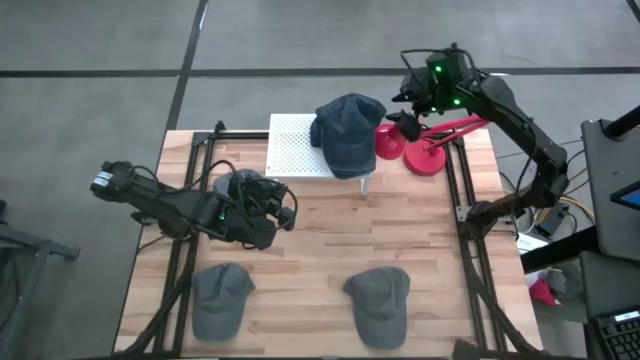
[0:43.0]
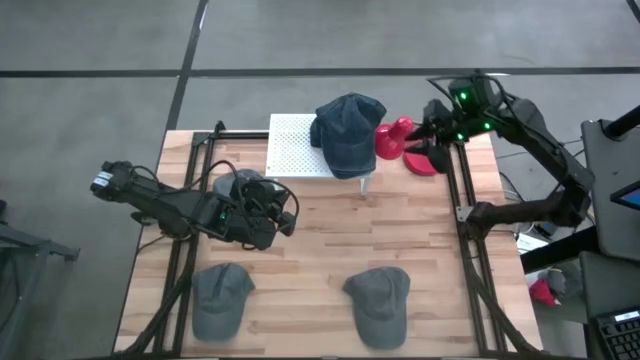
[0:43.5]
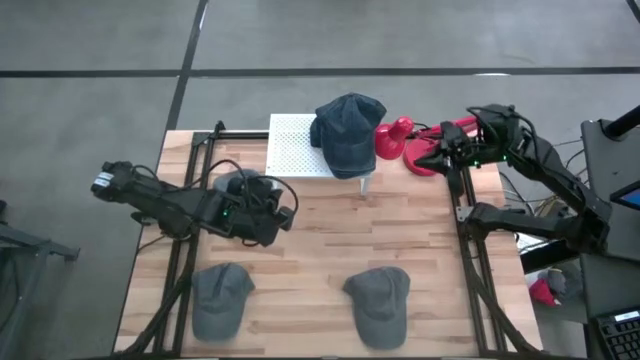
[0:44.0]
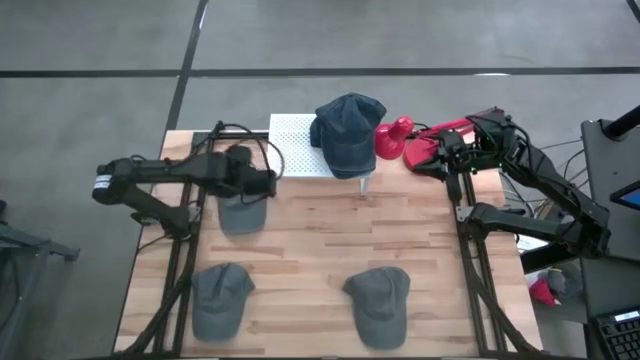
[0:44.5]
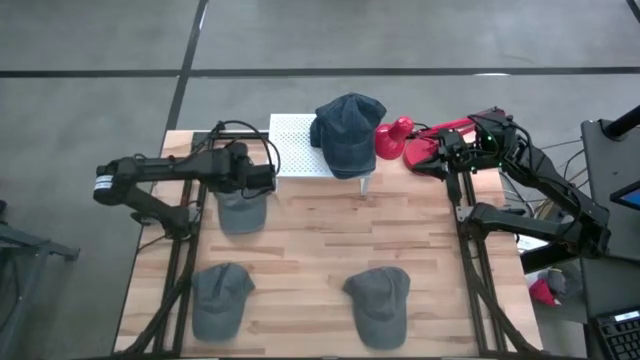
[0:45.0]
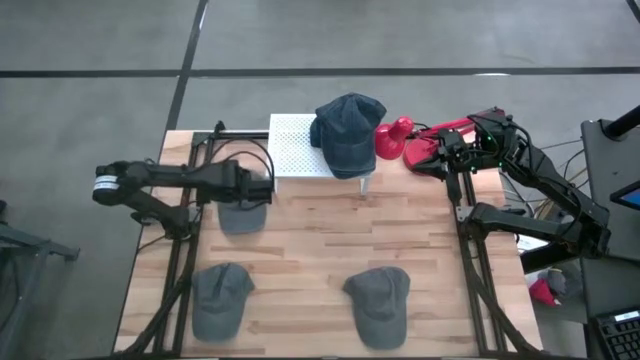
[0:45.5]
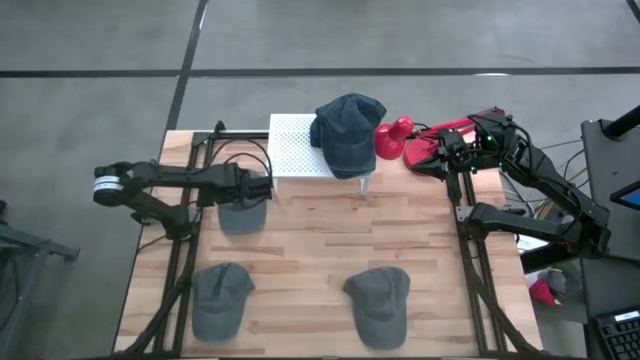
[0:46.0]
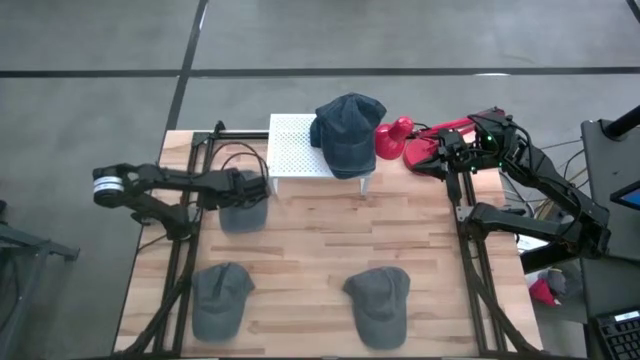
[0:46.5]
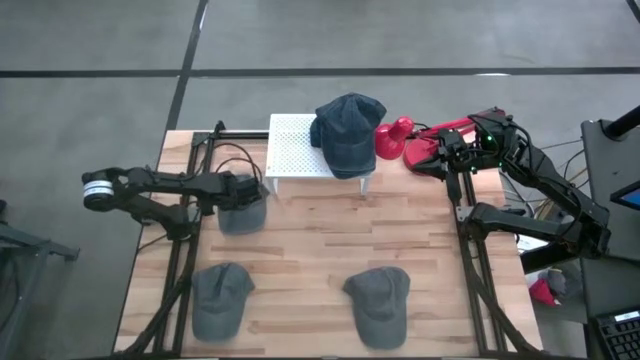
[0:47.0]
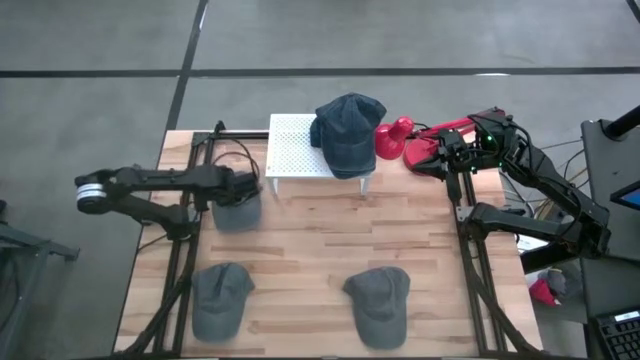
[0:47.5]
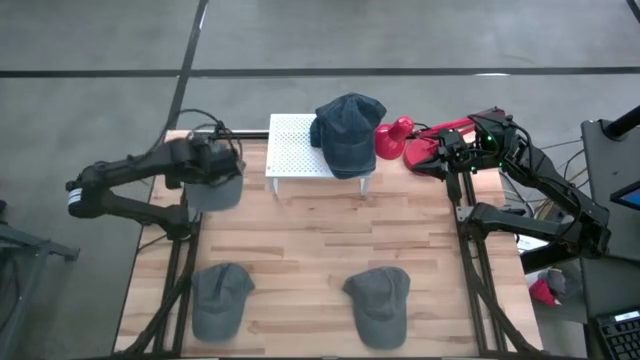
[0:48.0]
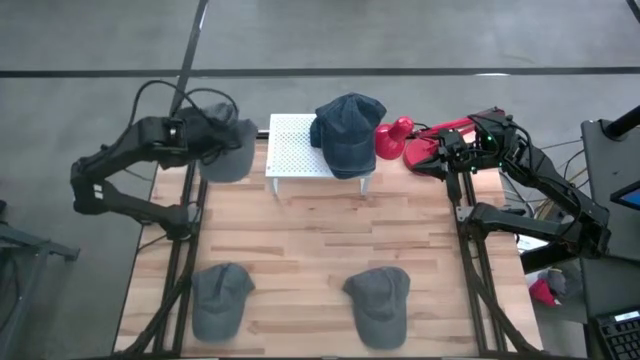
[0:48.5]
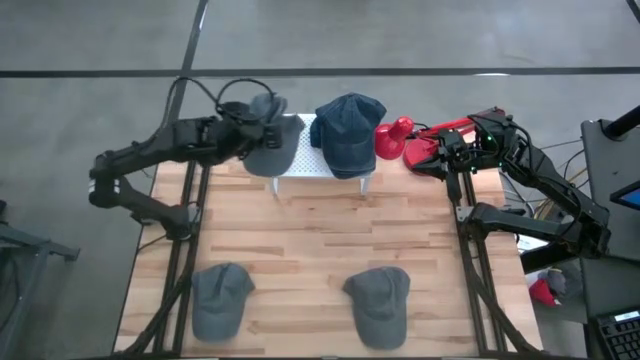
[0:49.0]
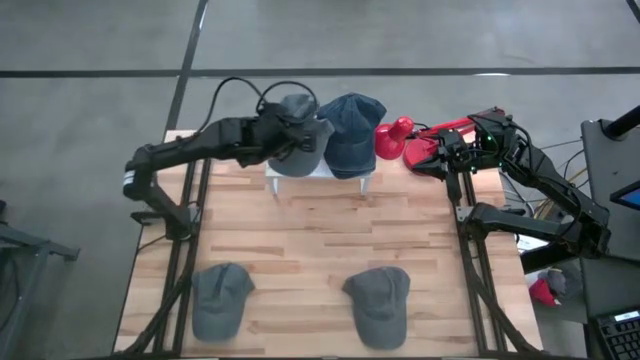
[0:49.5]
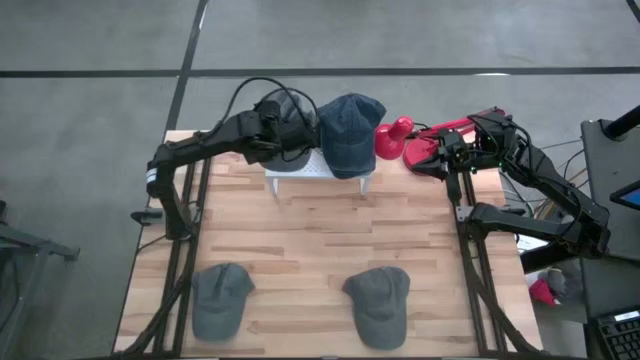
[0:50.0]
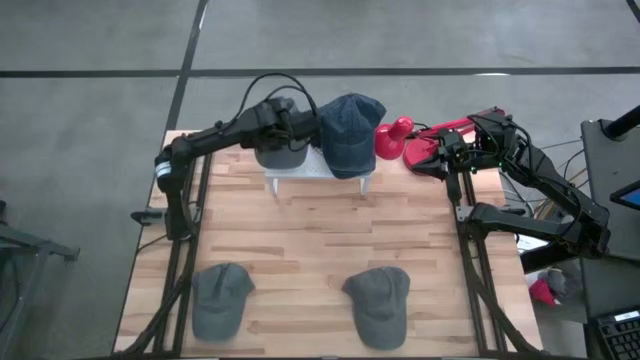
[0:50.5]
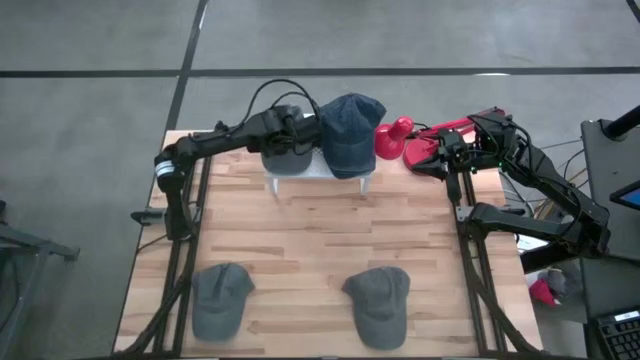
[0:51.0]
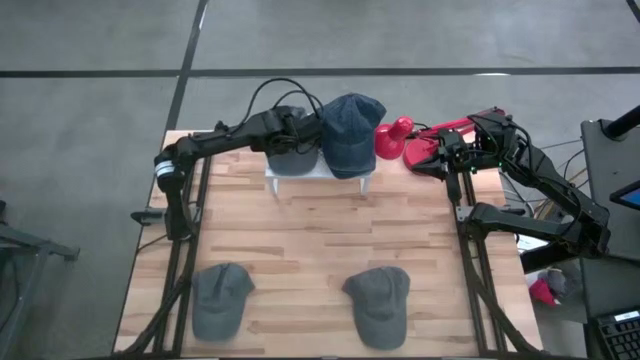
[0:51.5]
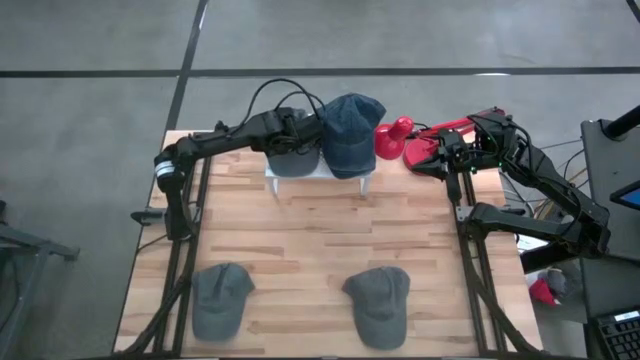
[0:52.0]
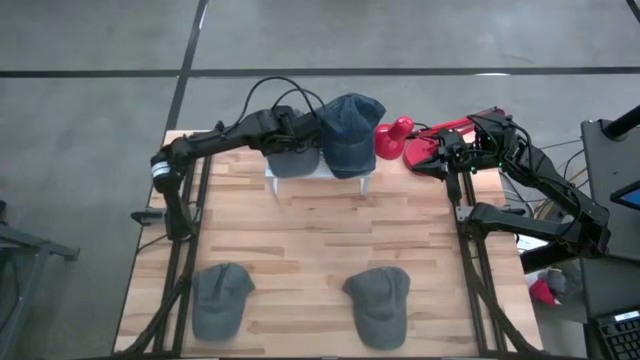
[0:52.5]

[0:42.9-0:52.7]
Task: Pick & Place hat
Put the top gray cap on the shelf

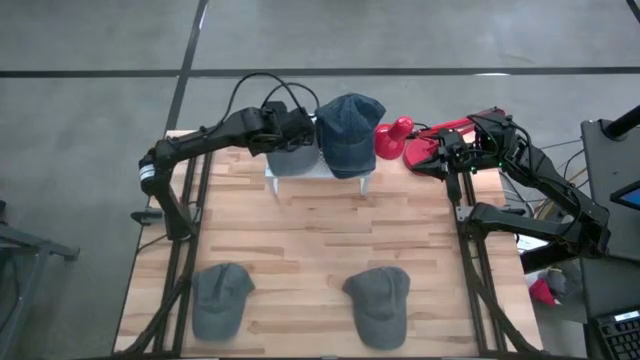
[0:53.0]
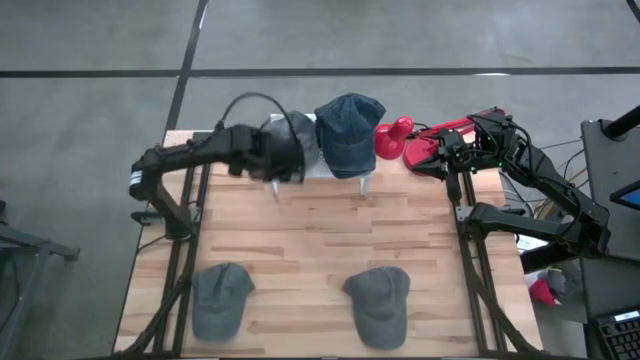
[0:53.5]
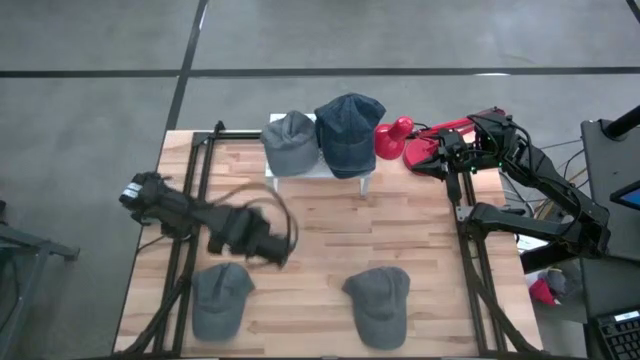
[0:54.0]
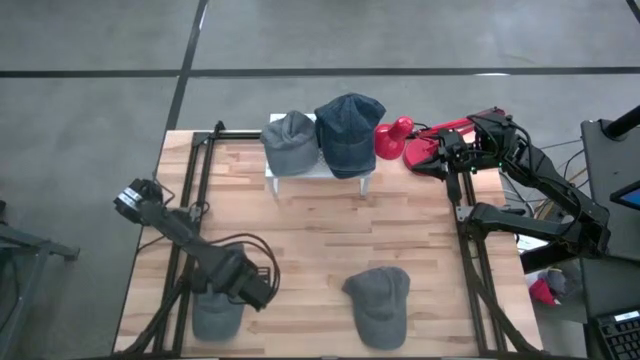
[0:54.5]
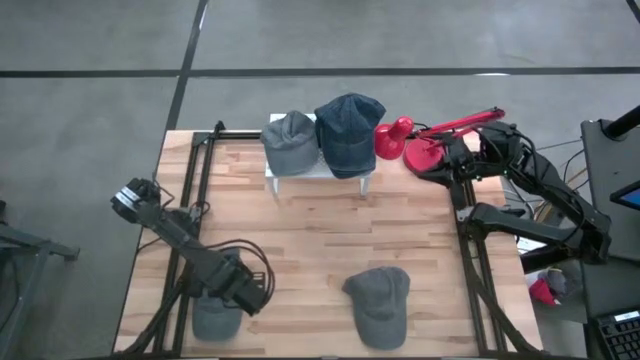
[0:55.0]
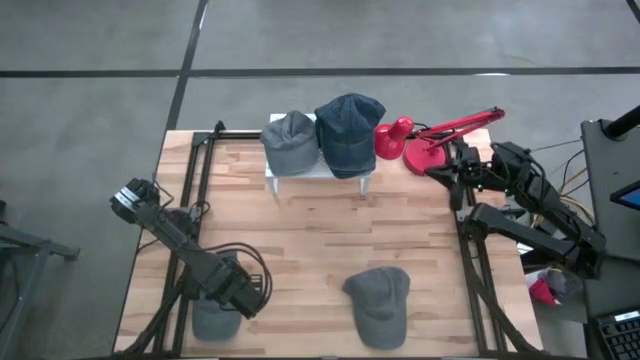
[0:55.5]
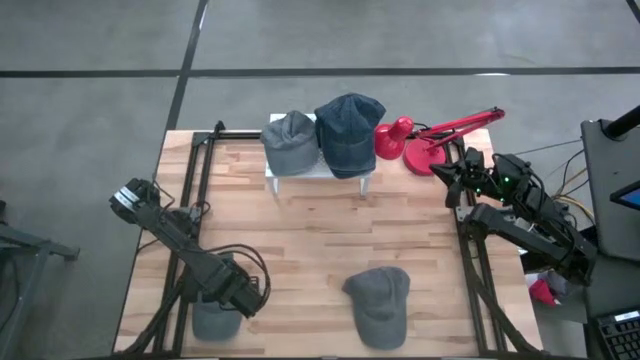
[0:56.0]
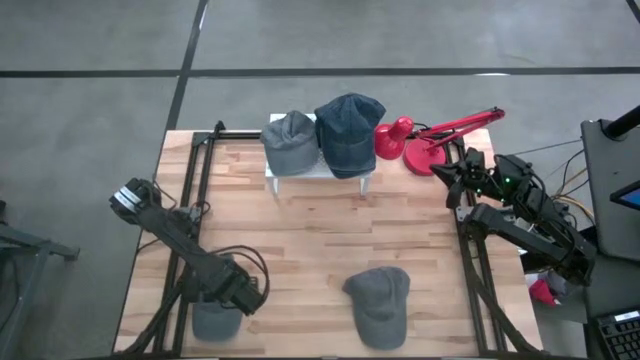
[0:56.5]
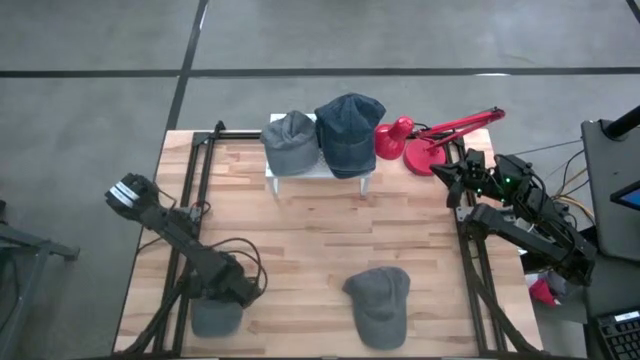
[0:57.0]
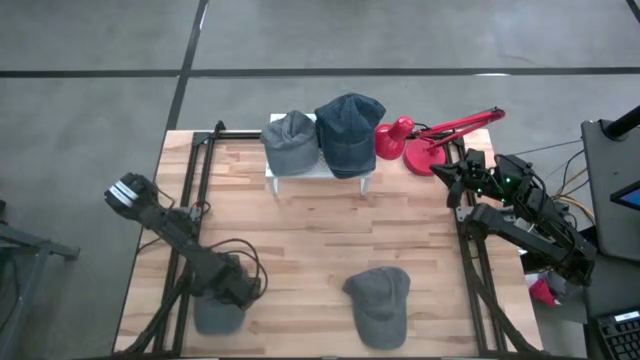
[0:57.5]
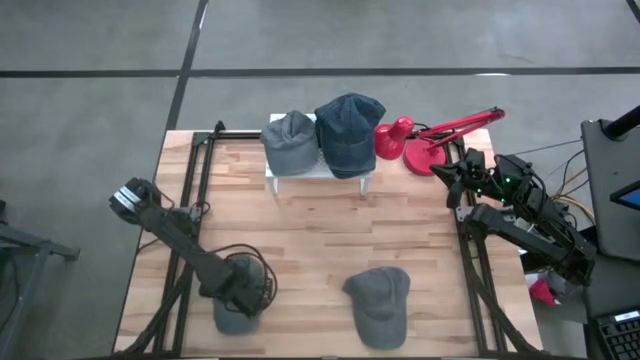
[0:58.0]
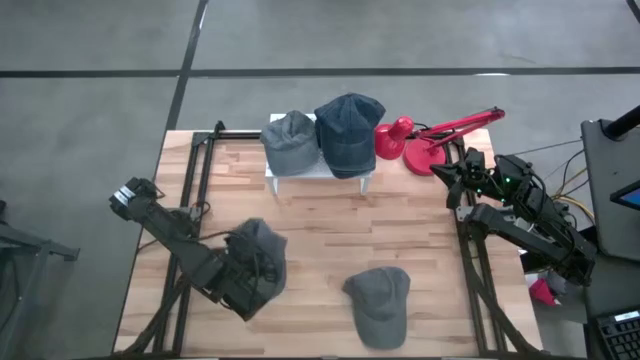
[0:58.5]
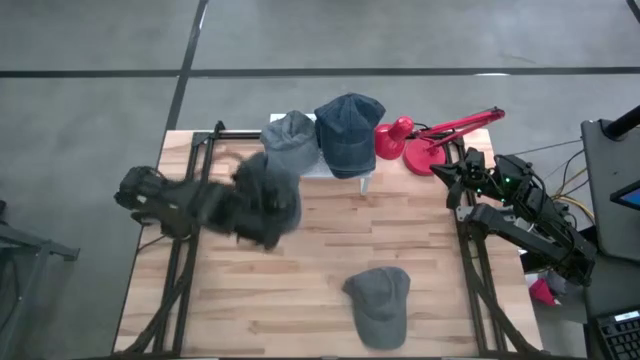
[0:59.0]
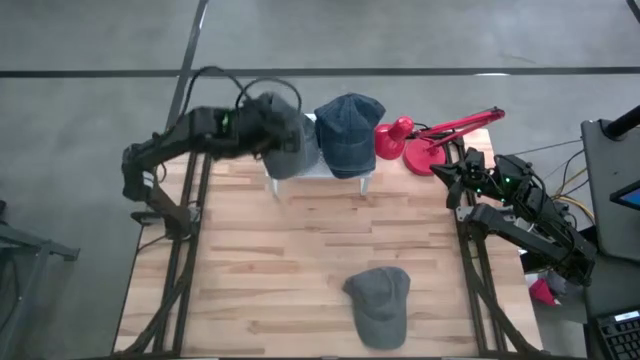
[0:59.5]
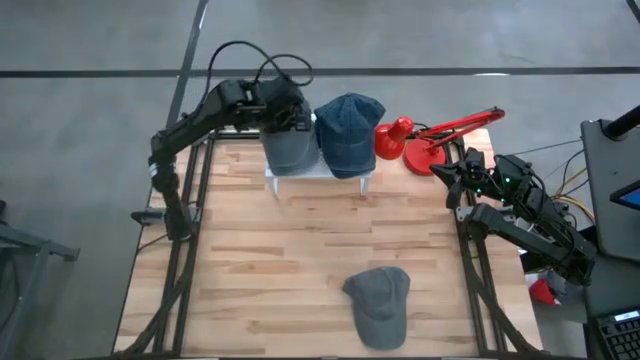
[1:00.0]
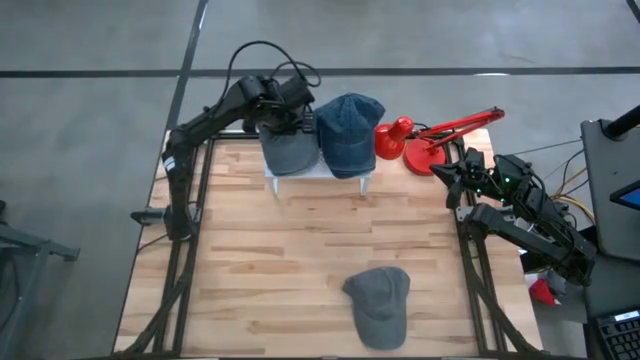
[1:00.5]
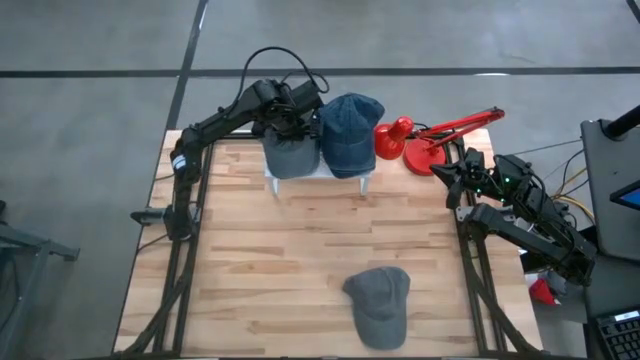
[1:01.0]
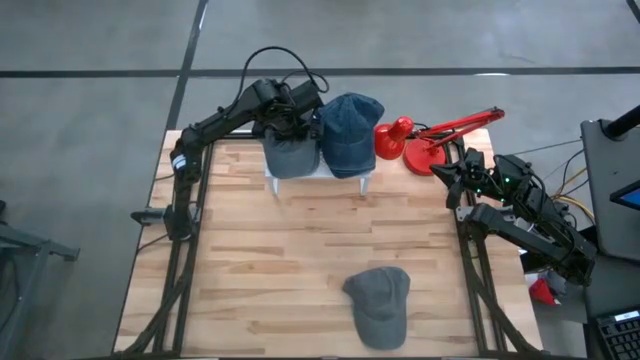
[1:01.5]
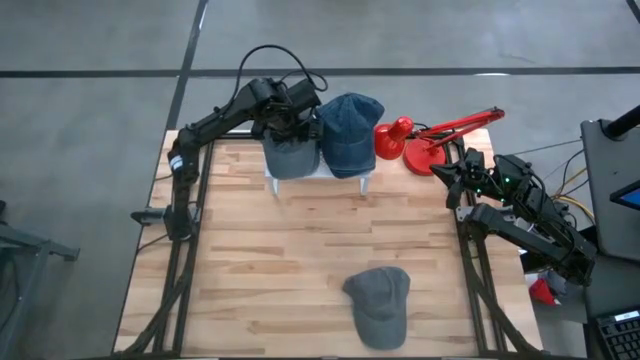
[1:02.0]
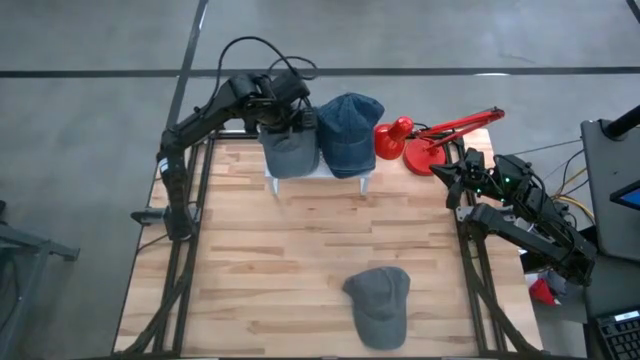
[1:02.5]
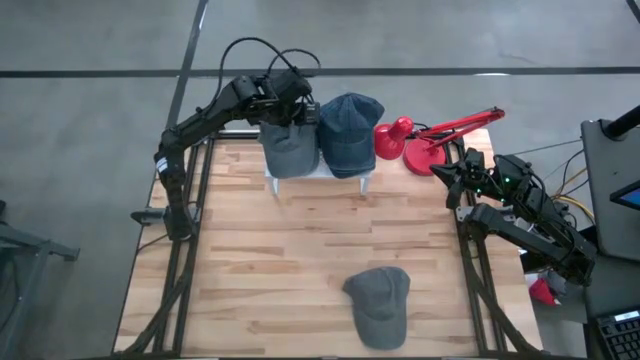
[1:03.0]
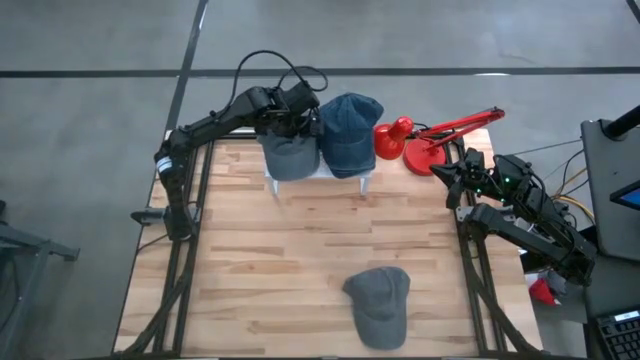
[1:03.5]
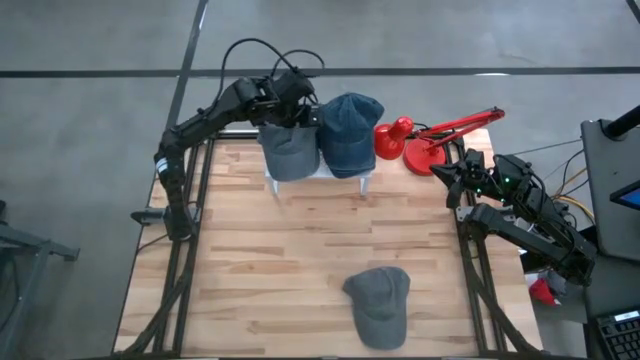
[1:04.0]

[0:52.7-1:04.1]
Stack the left gray cap on the gray cap on the shelf
